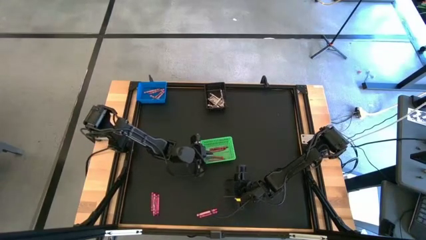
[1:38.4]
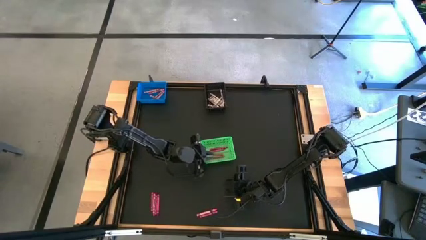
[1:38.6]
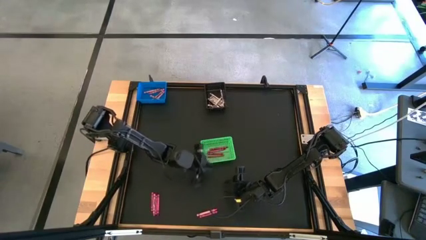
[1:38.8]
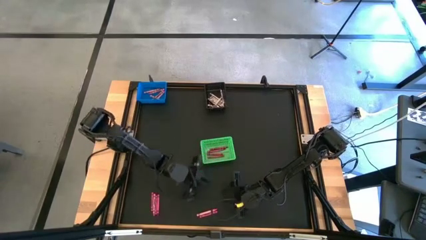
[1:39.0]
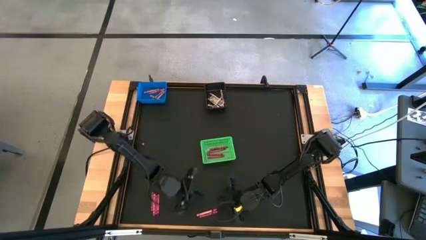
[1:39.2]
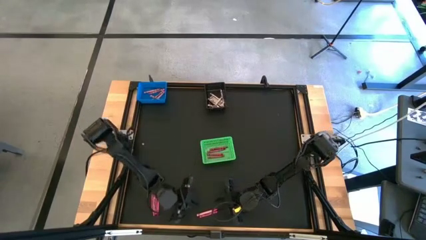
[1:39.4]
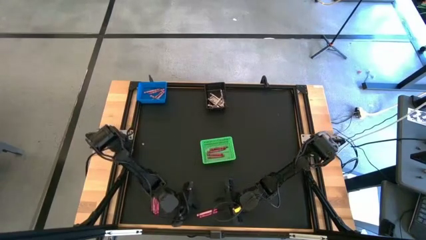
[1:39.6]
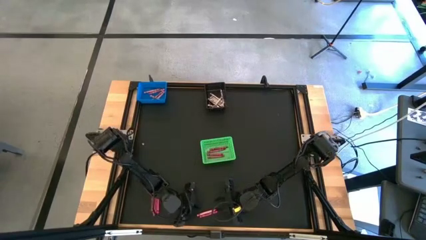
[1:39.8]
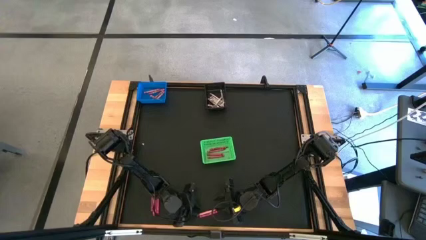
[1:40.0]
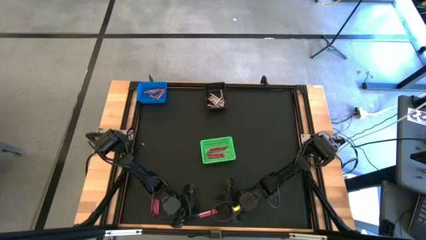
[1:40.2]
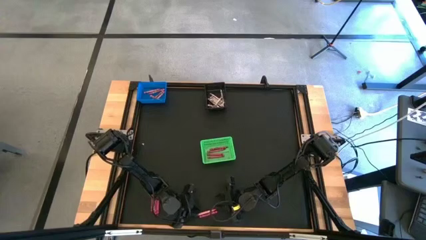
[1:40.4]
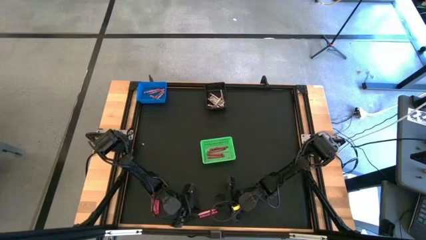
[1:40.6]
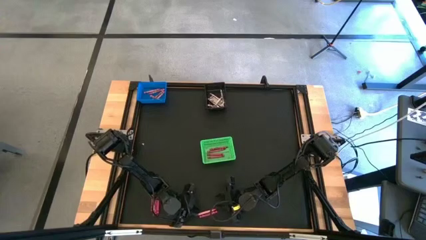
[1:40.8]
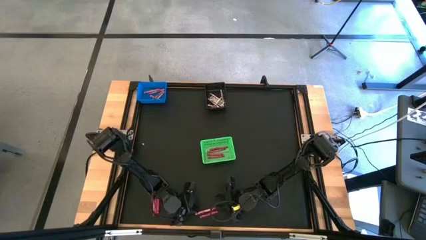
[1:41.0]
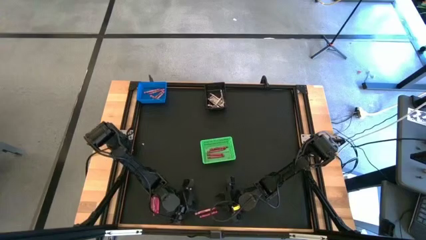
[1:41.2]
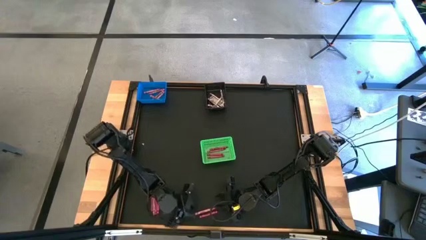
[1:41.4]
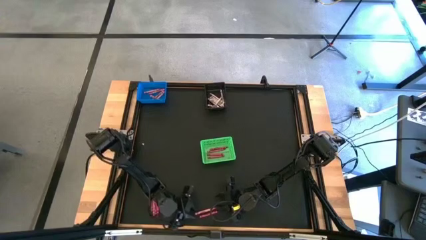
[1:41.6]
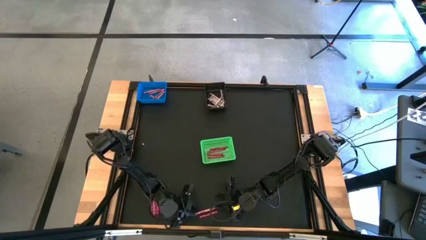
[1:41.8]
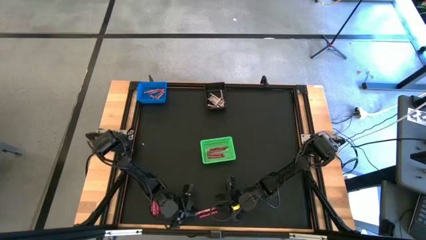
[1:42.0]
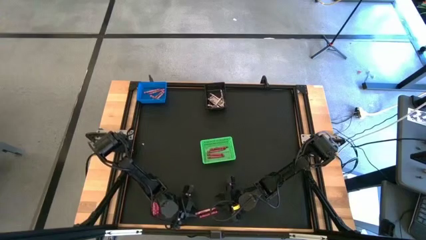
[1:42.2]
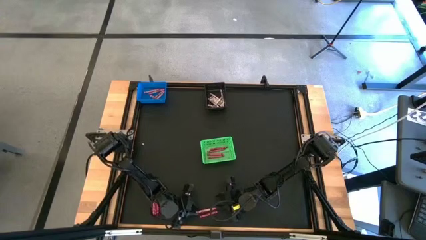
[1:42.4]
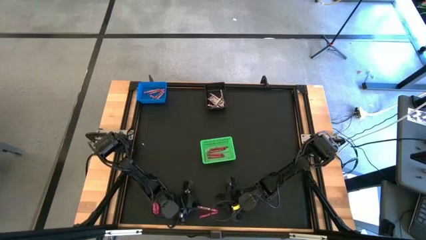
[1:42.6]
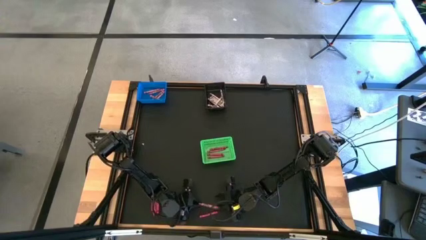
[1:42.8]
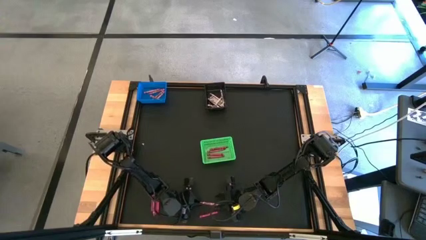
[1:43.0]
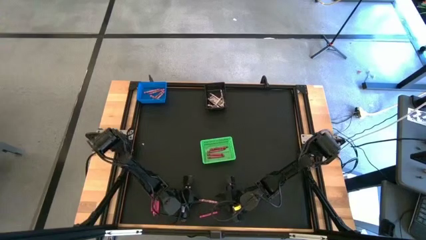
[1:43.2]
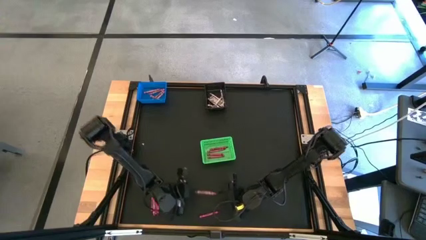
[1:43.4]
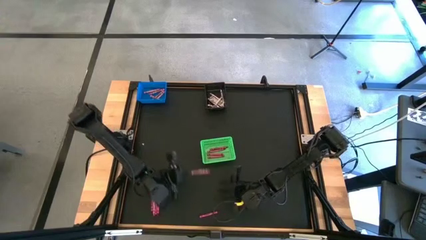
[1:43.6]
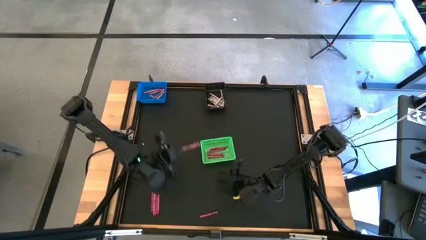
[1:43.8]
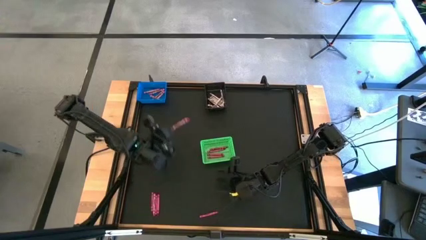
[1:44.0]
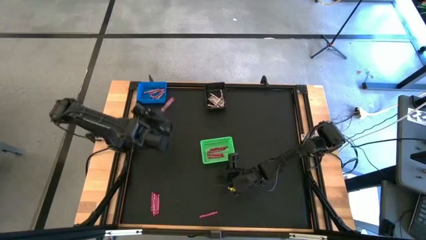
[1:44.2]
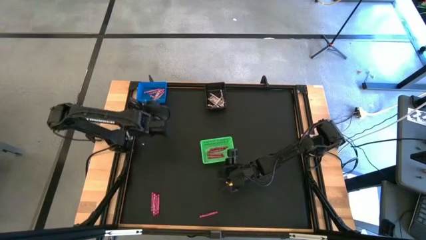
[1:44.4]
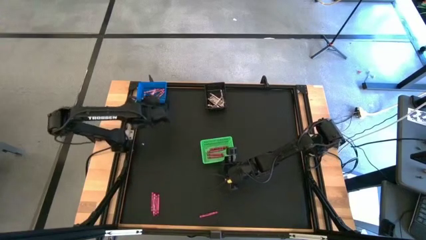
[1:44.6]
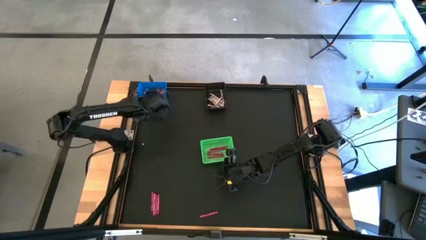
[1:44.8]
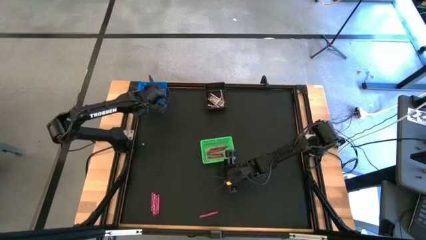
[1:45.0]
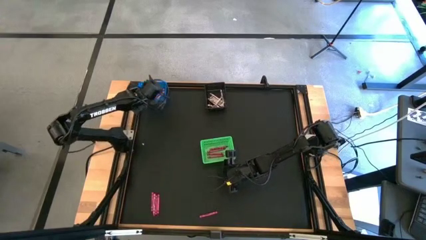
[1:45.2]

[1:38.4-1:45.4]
Task: Sort crayons
Put the pink crayon into the blue bin

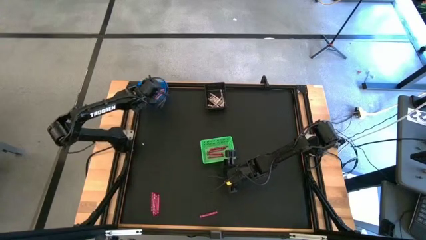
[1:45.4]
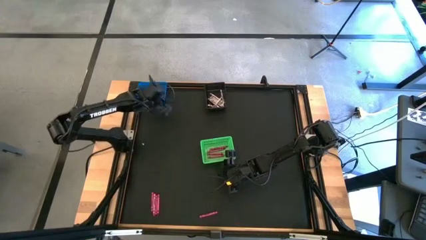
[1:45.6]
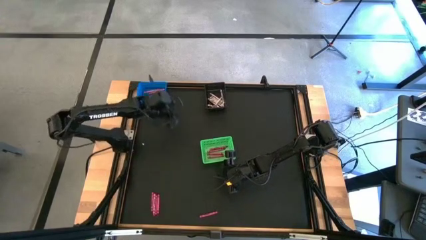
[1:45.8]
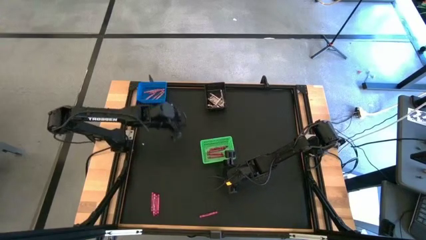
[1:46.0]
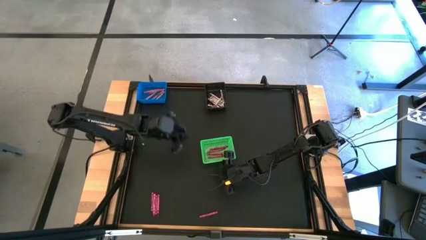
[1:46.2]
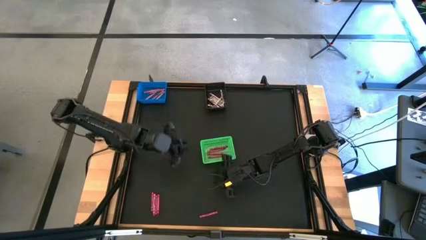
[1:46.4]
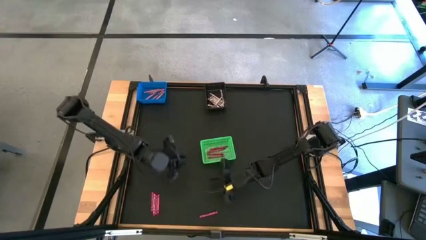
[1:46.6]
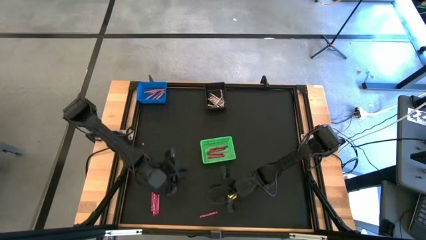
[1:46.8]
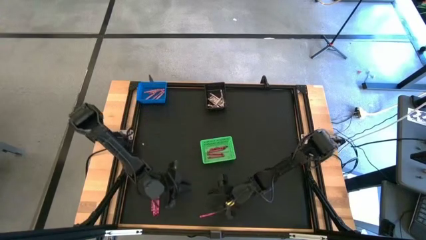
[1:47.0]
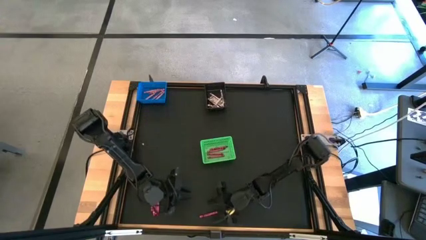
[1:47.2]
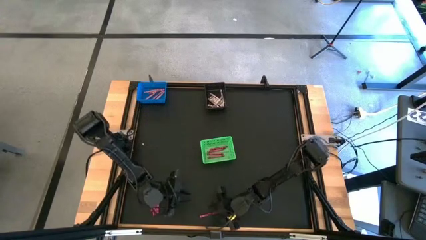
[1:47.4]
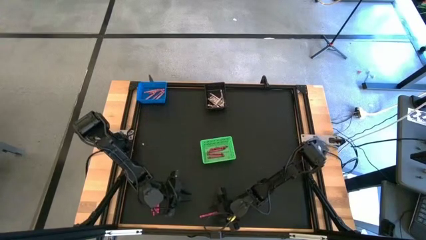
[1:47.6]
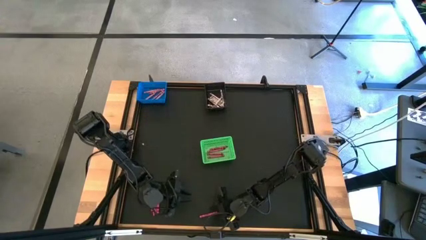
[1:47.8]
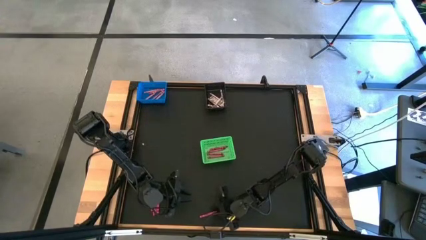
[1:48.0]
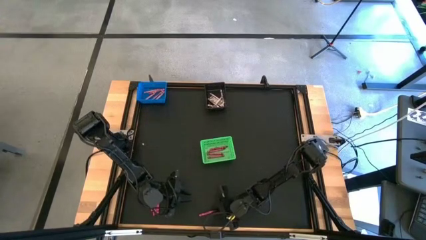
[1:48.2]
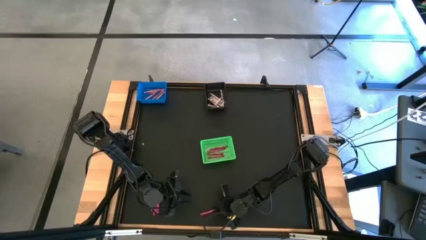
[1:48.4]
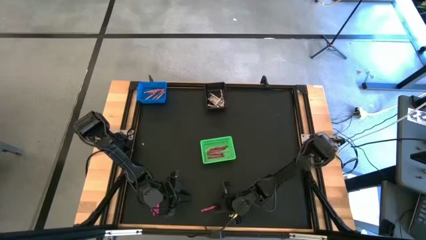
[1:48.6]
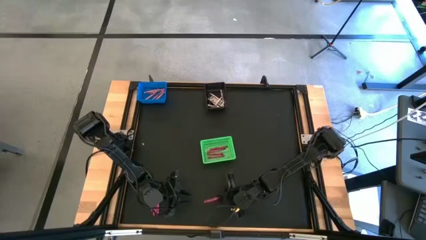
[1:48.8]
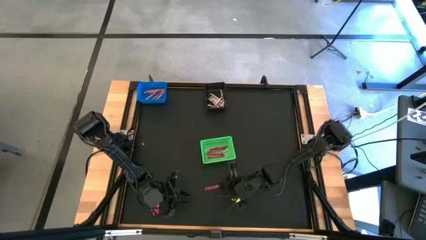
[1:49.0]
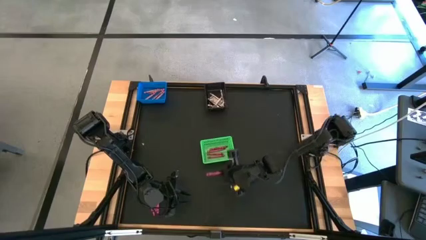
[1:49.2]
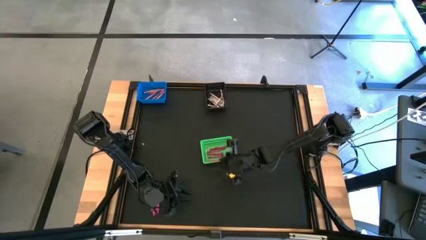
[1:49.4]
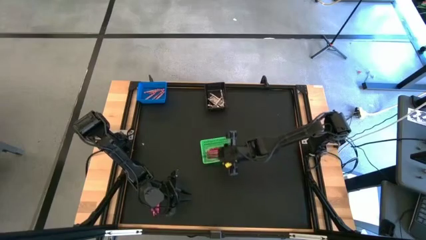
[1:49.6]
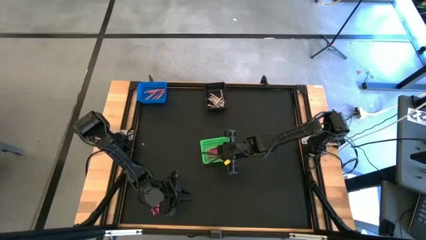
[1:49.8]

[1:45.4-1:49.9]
Put the red crayon into the green bin

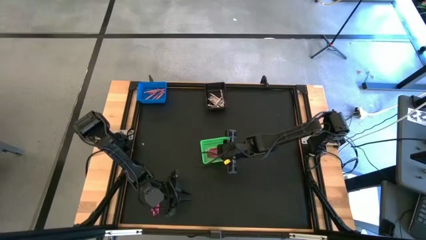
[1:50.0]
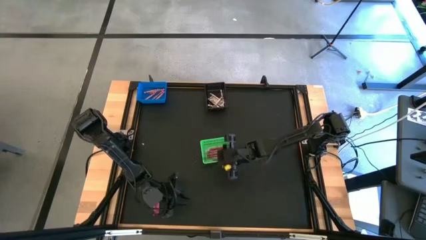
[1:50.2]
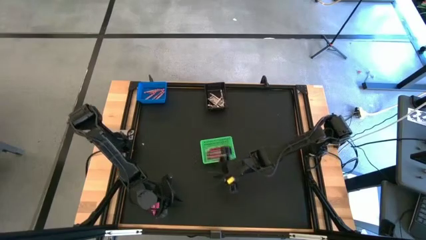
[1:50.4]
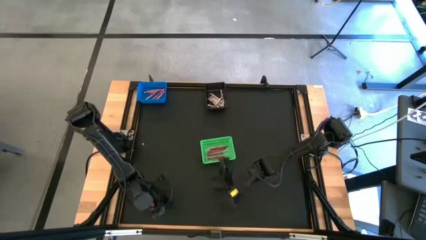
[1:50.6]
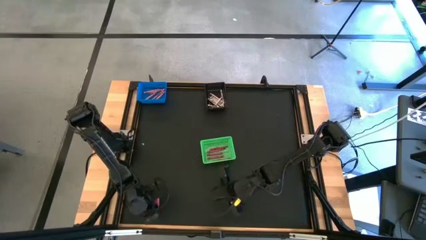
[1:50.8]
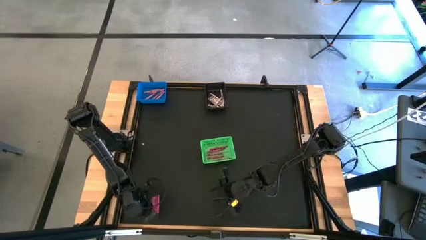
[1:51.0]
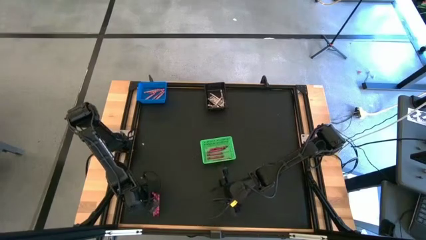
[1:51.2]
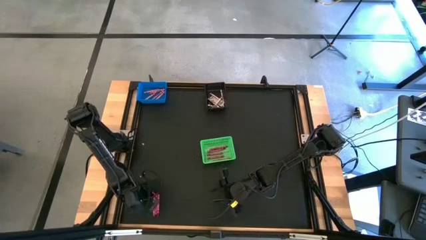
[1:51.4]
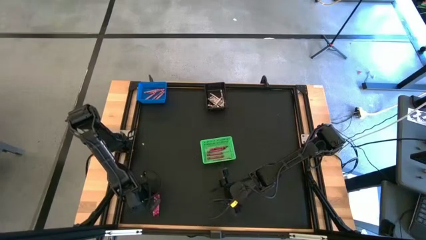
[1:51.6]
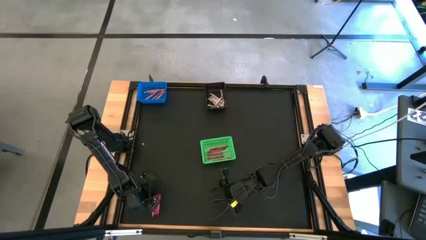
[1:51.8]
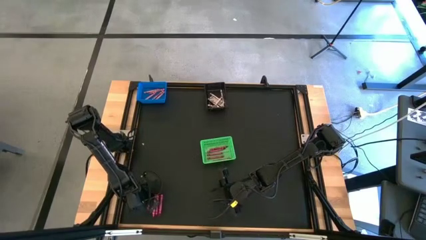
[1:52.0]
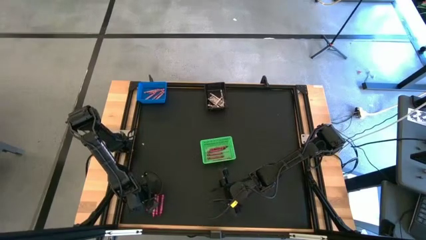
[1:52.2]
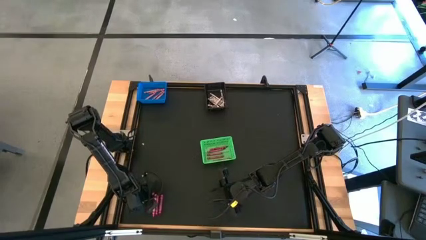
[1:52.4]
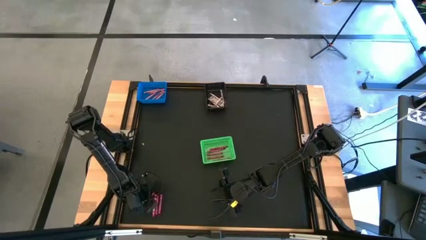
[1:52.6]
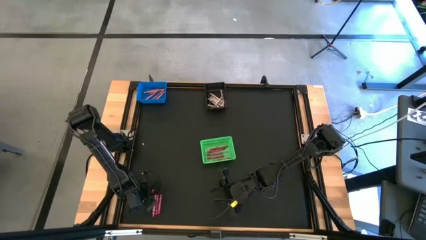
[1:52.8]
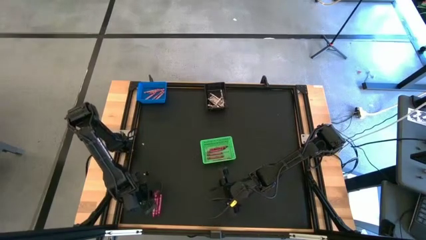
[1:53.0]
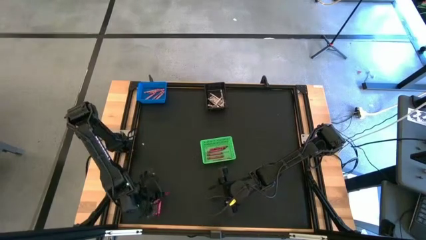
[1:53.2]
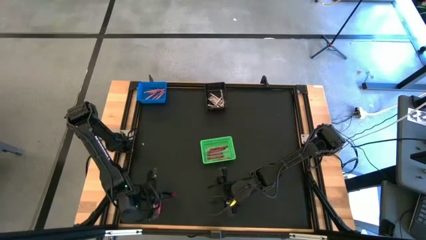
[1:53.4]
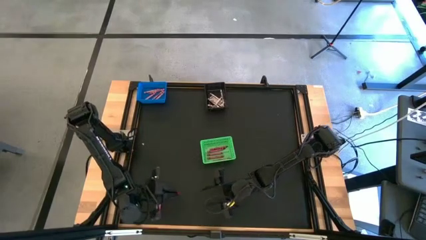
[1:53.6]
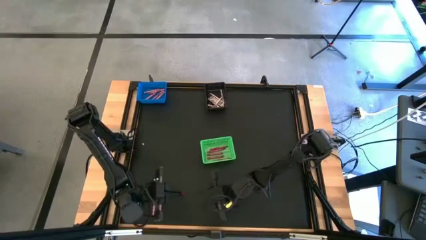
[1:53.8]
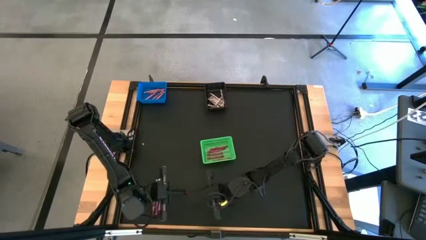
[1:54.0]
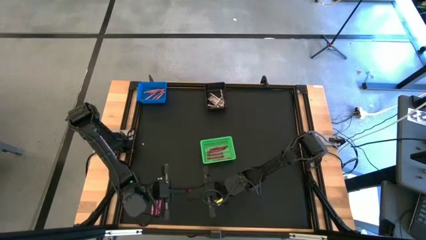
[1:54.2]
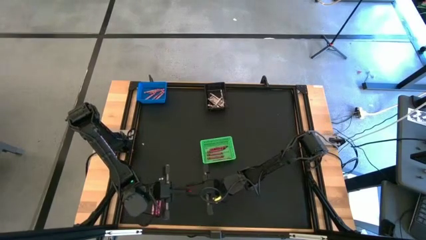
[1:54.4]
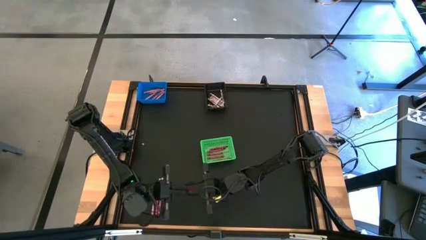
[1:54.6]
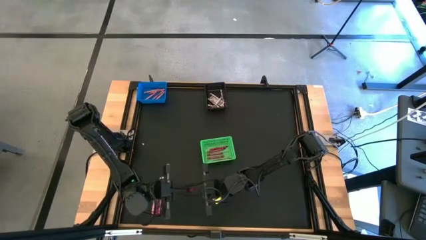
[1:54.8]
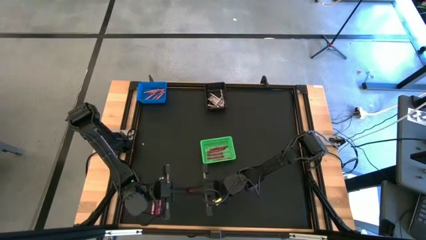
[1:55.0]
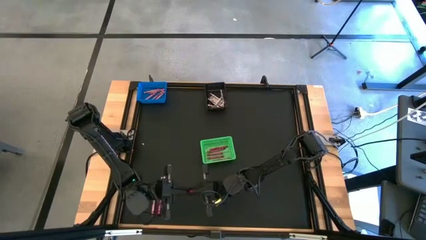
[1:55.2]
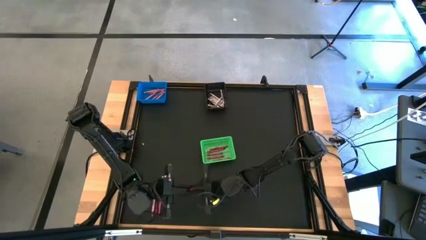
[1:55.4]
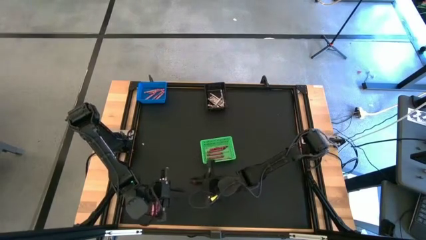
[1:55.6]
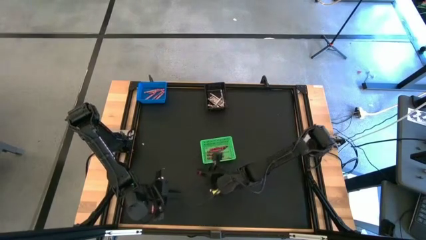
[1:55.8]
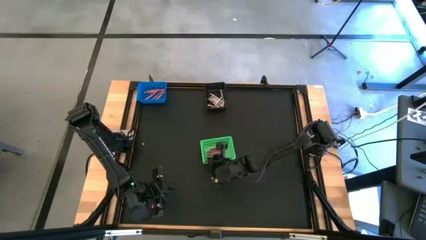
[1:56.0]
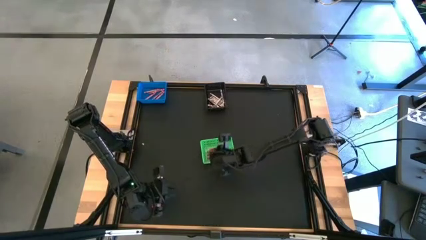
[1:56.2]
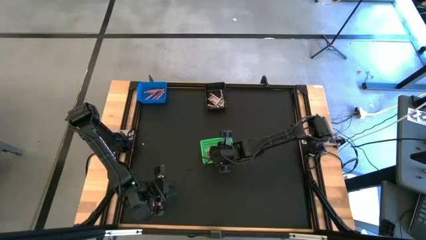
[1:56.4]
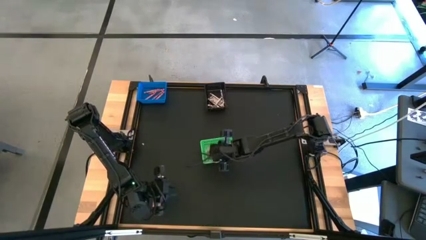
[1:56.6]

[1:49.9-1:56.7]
Put the red crayon into the green bin
